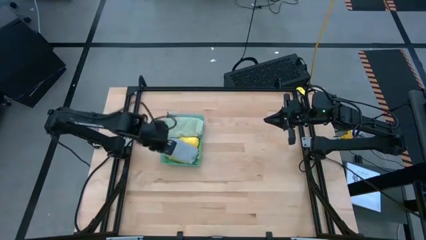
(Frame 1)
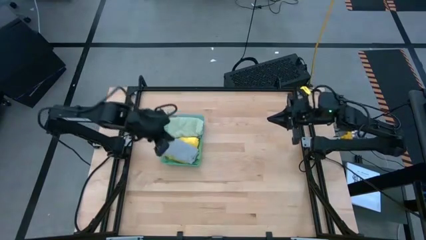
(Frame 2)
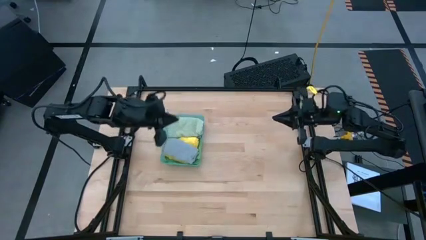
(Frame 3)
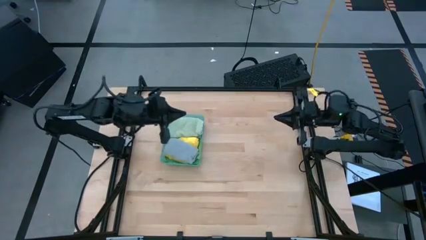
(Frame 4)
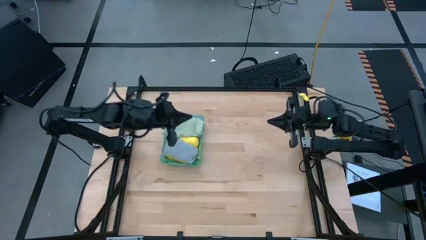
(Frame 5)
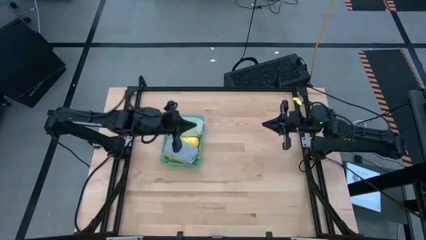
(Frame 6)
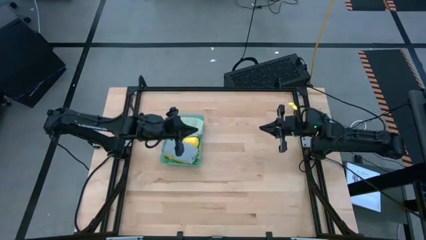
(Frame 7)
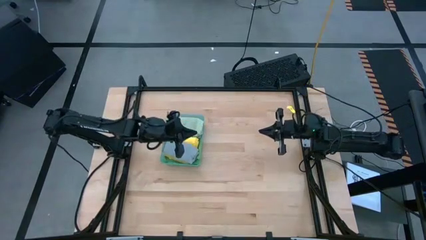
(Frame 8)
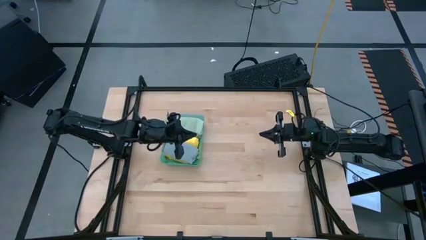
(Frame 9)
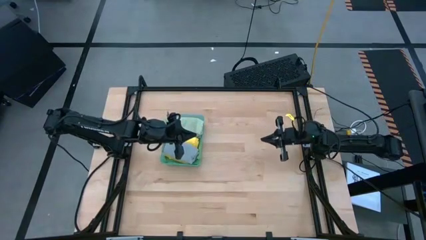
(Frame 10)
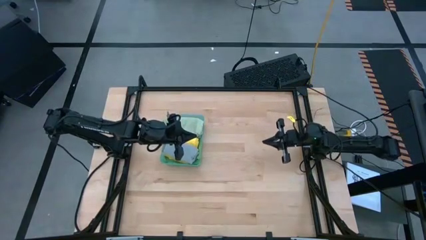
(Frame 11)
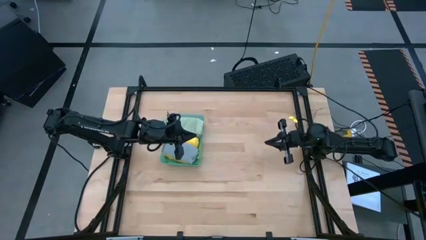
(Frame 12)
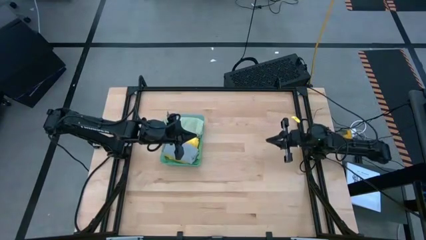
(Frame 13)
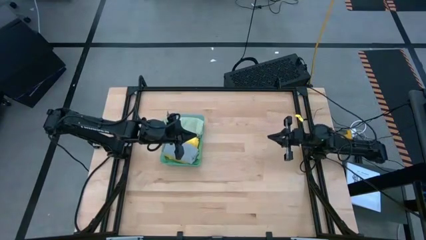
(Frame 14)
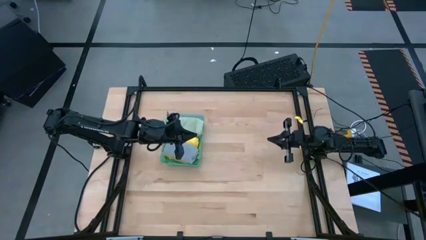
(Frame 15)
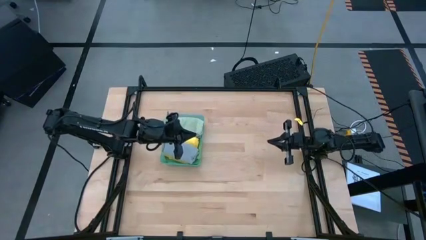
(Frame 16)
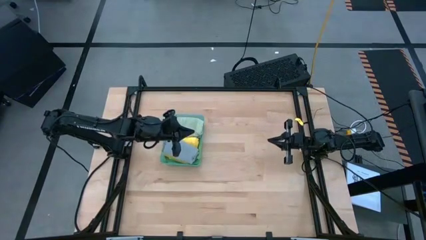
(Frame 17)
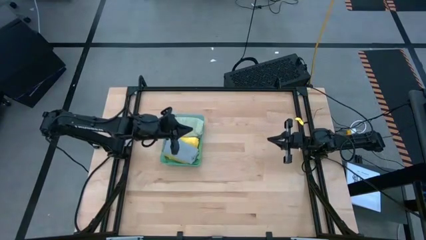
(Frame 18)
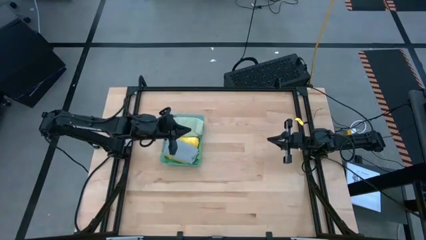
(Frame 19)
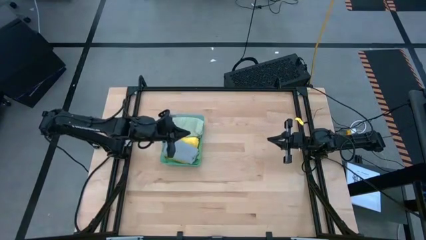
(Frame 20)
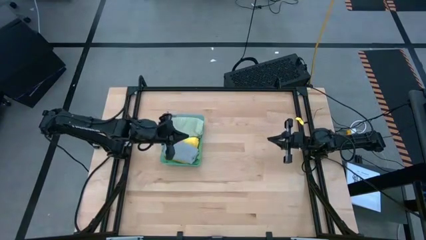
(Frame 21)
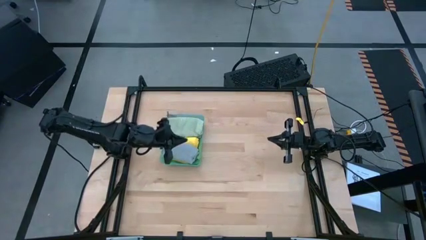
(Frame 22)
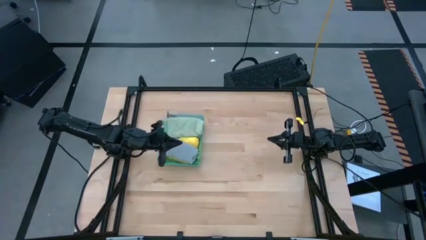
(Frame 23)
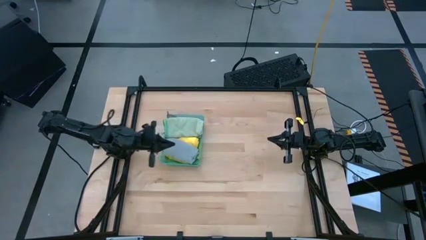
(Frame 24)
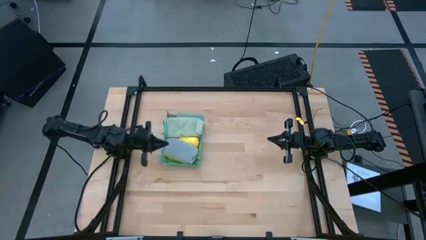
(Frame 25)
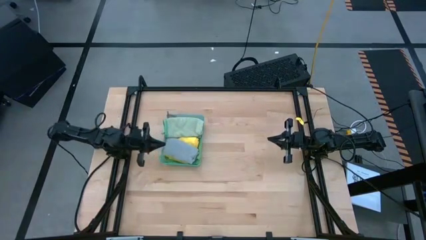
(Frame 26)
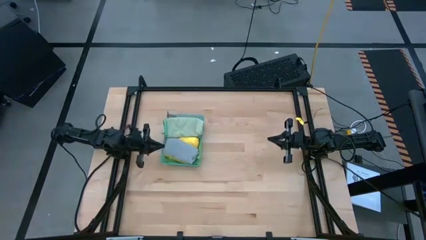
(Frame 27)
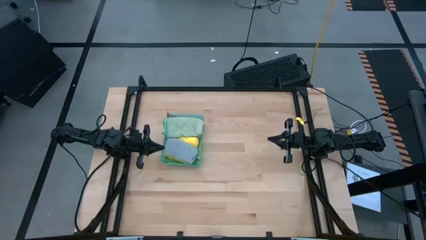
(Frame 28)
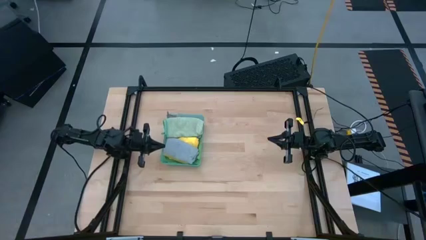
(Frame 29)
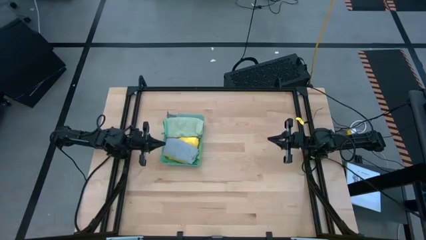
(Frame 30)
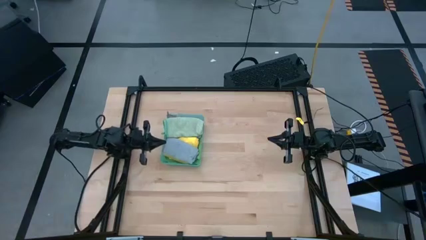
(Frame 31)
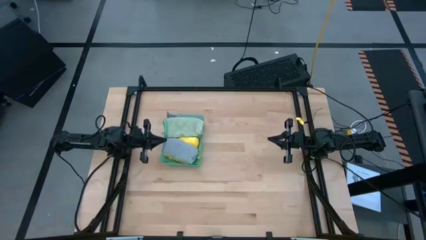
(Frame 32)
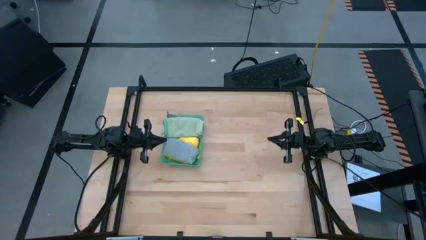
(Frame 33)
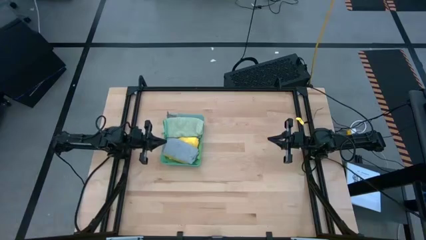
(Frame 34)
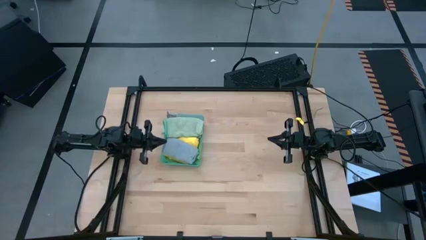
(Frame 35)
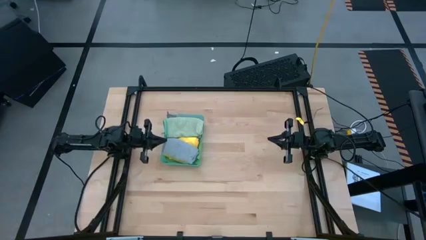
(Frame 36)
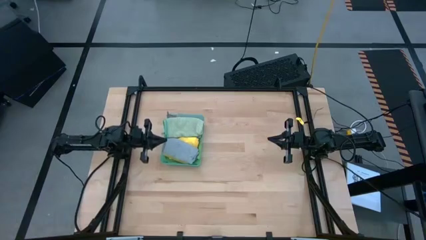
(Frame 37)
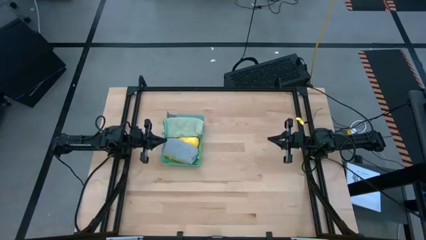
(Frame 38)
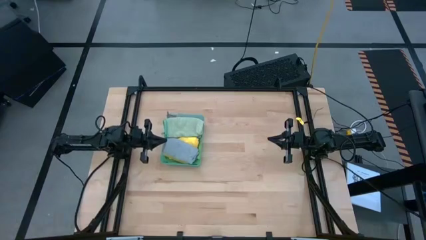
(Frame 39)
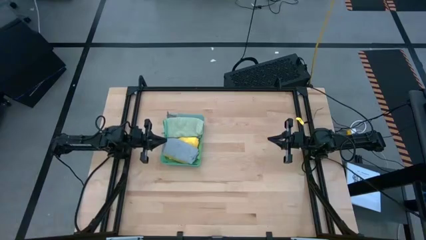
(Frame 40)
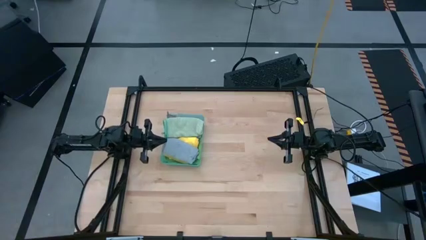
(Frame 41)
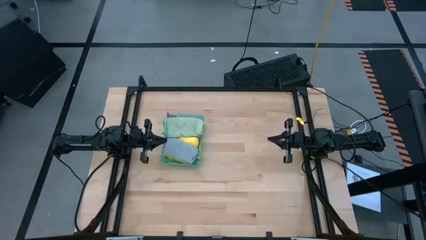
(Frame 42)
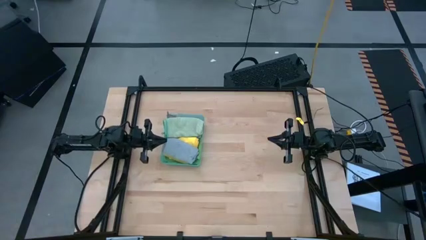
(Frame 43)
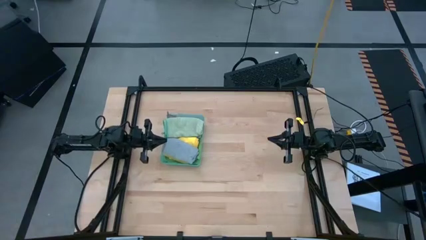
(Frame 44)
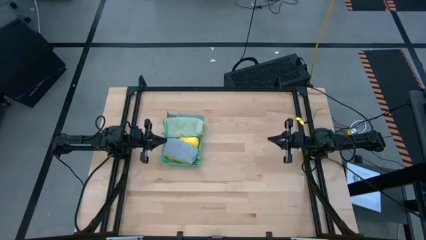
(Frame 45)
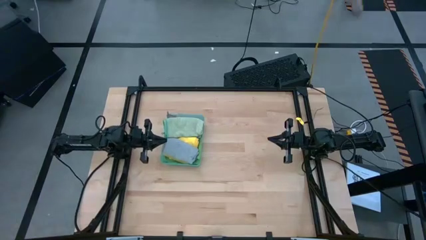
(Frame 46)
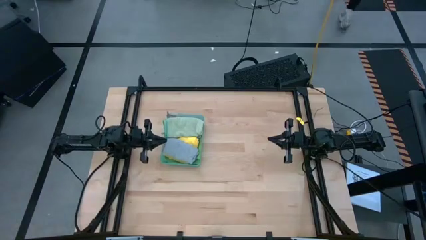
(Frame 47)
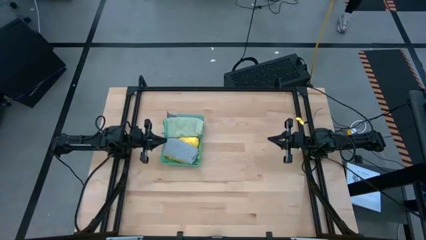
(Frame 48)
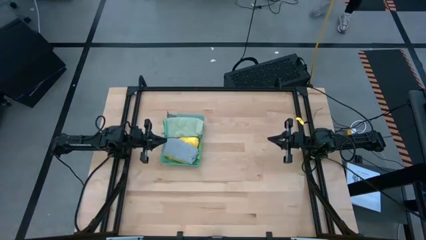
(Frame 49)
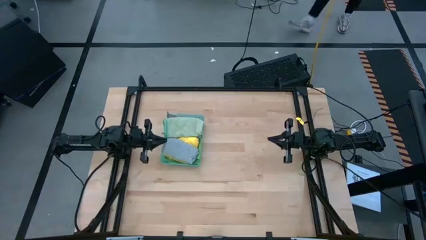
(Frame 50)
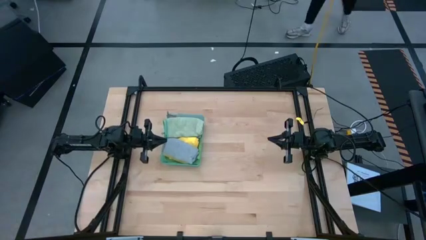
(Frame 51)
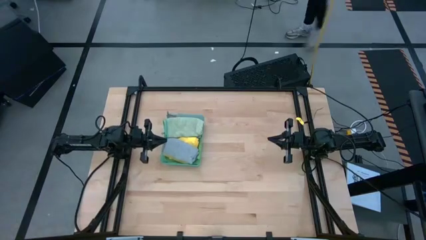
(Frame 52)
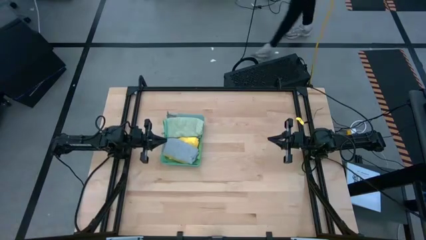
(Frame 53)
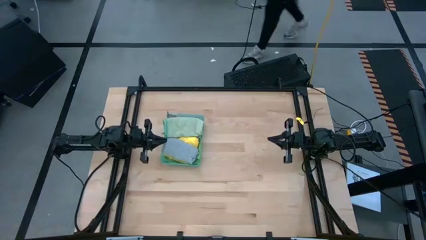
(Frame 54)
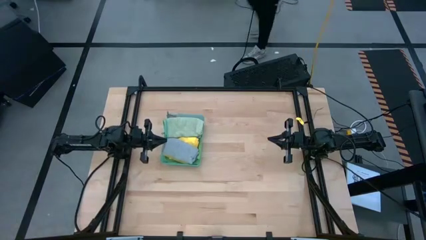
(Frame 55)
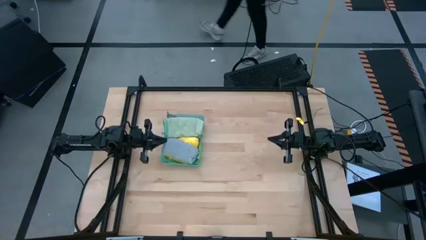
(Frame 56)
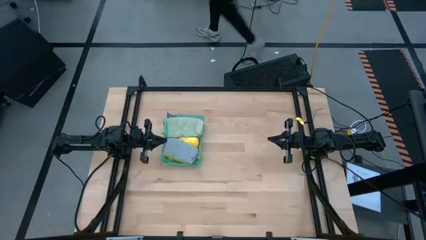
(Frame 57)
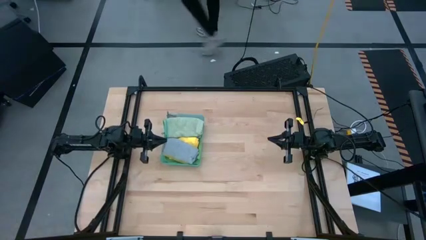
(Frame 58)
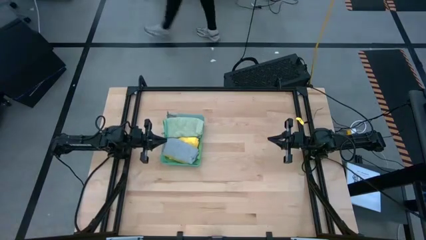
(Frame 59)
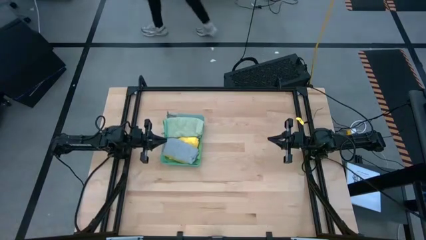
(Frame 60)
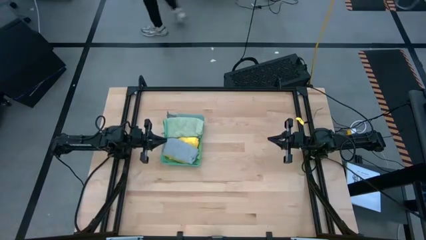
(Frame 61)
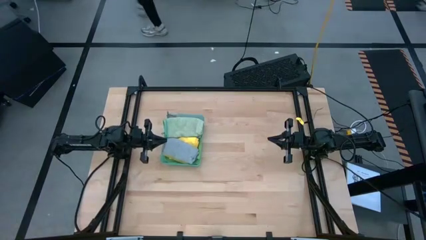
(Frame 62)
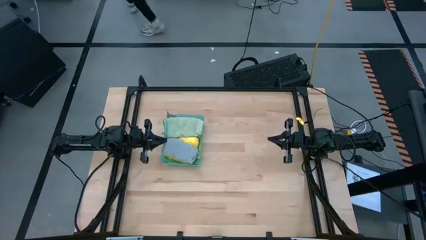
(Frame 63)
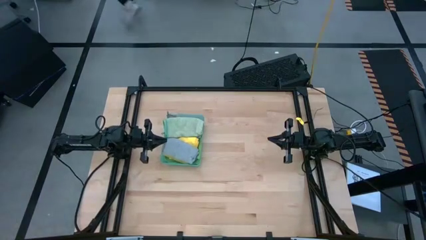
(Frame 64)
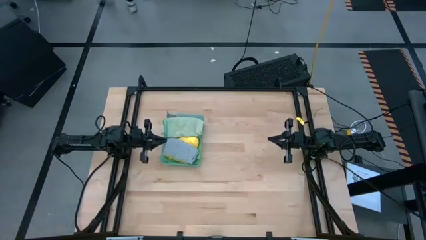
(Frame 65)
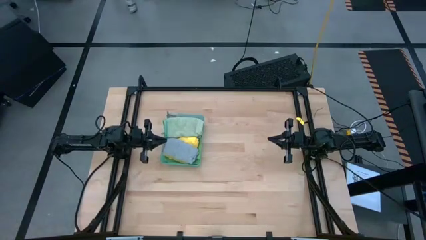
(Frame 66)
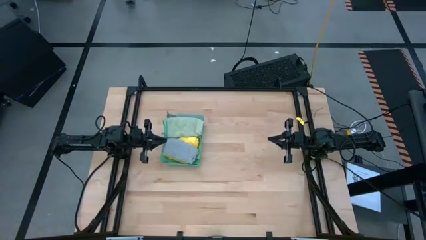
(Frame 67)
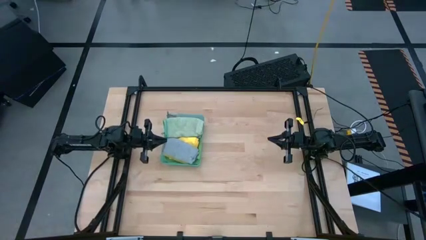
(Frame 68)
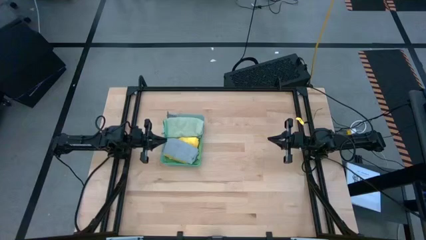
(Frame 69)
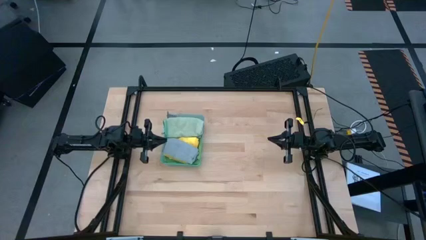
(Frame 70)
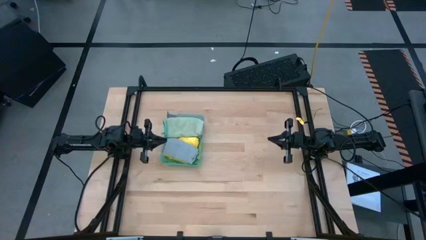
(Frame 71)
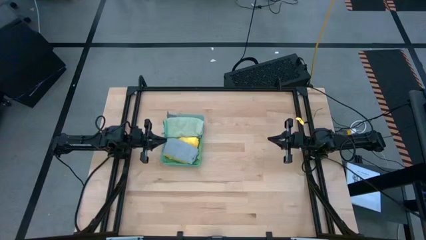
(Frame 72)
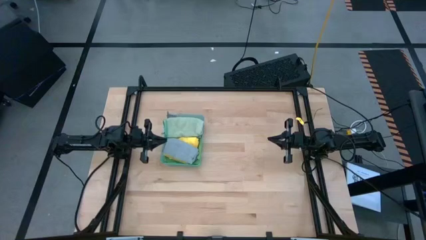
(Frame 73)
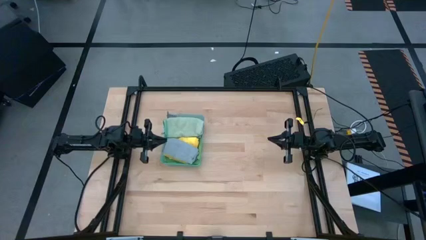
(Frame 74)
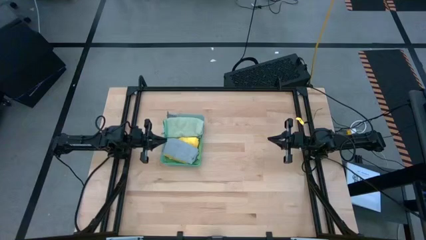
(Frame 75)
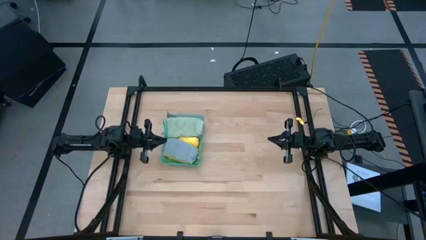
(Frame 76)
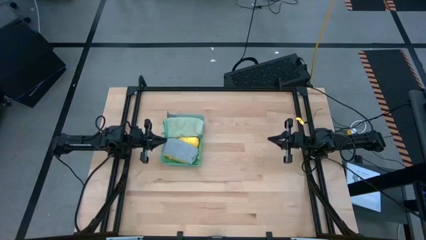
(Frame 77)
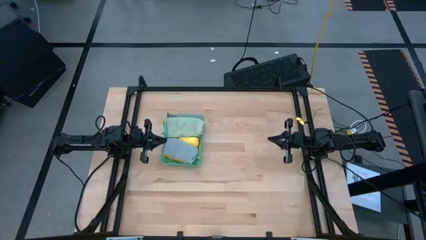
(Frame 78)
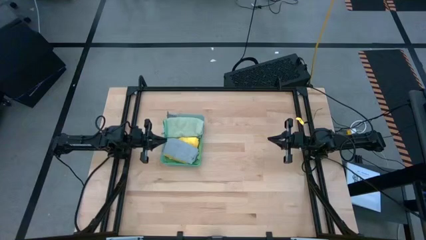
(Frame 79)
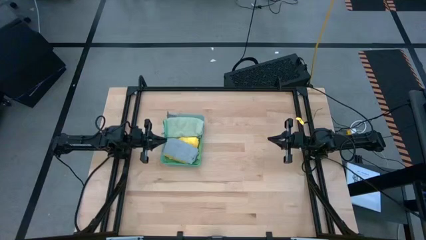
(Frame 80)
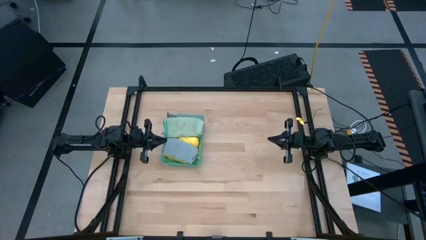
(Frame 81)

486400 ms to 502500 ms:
Task: Fold microfiber towels
Return to Home Position

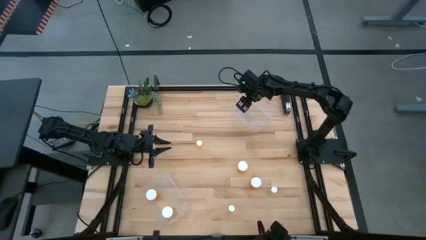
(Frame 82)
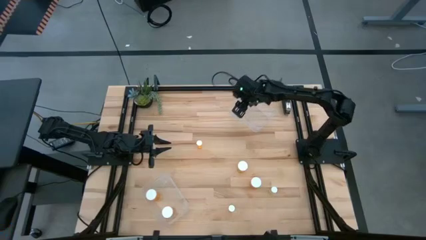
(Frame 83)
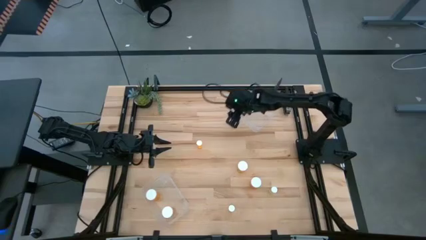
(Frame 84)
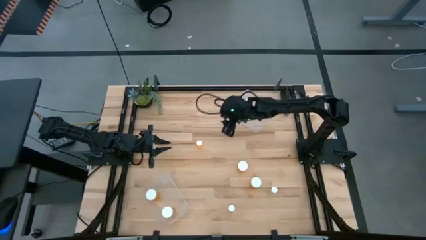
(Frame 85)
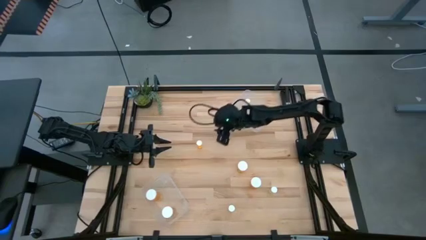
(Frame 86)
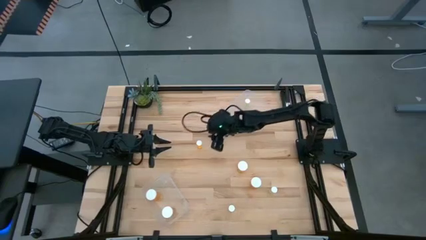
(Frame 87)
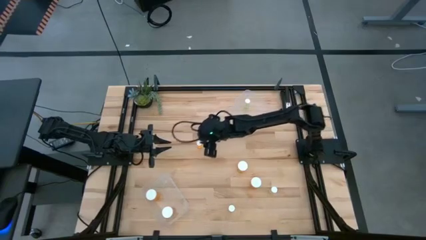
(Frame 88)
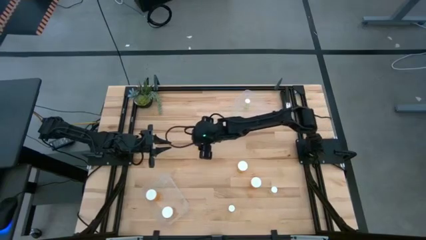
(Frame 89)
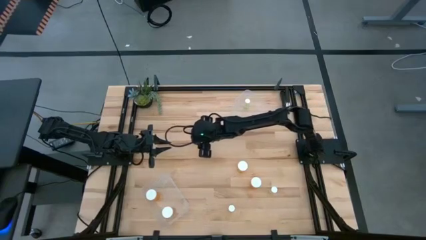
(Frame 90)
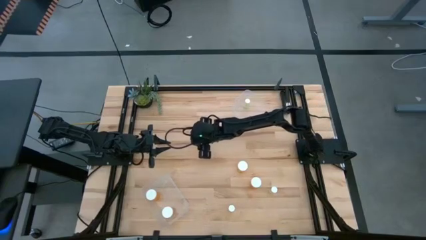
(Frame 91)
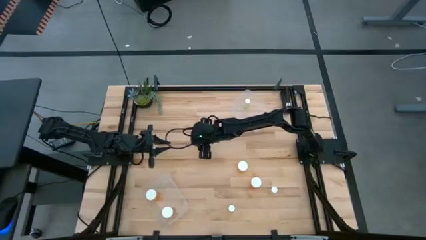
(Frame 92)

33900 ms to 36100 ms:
Task: Pick and place medicine bottles into bin by pill shape (circle, oval)
Put the small orange pill bottle into the top transparent bin
